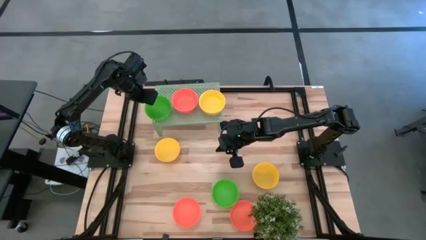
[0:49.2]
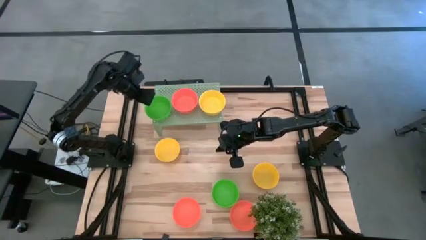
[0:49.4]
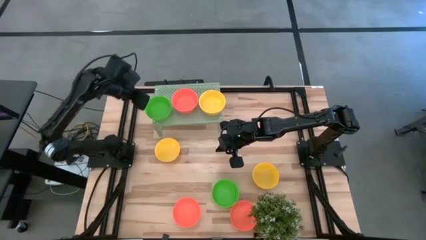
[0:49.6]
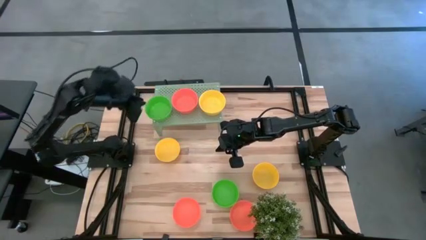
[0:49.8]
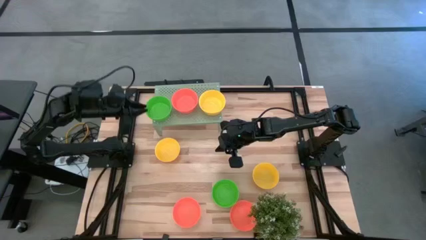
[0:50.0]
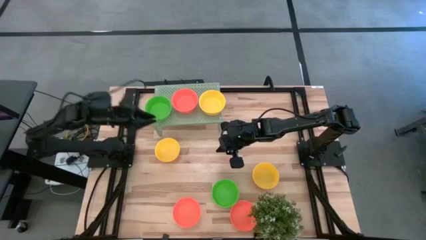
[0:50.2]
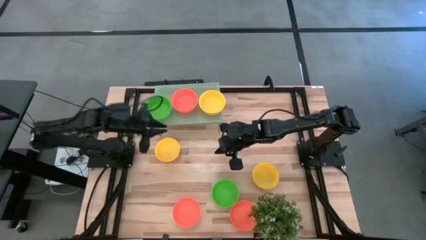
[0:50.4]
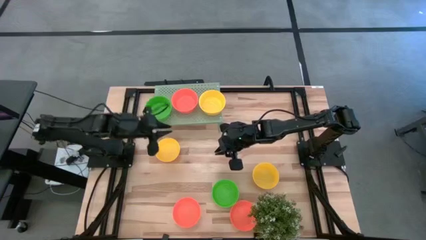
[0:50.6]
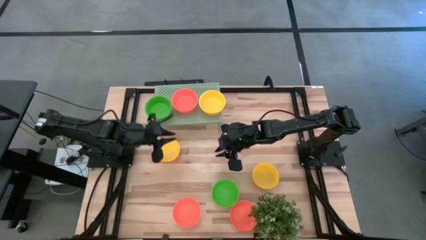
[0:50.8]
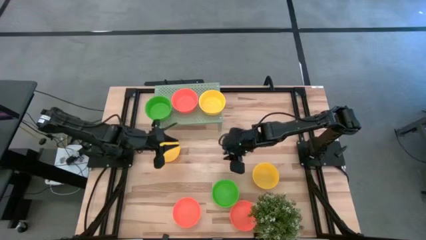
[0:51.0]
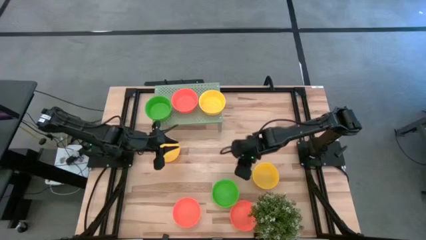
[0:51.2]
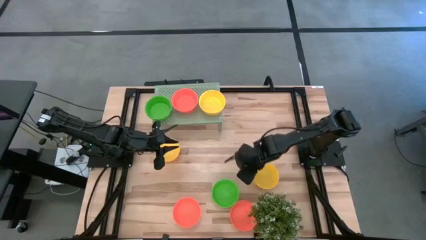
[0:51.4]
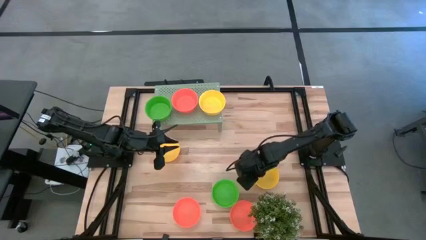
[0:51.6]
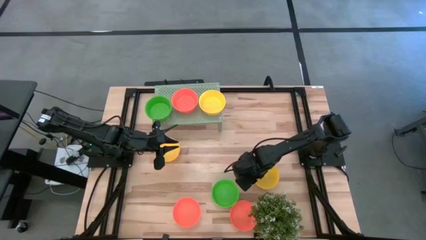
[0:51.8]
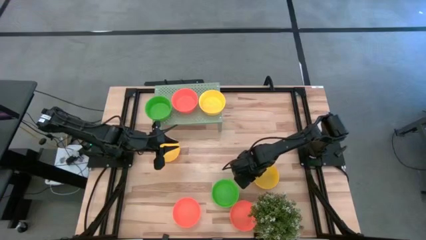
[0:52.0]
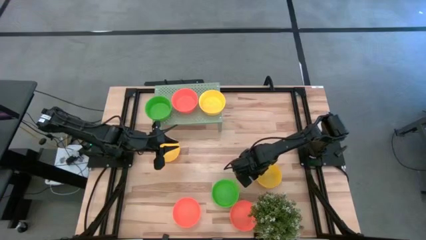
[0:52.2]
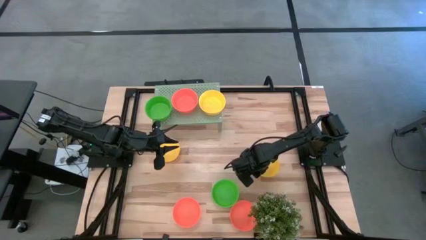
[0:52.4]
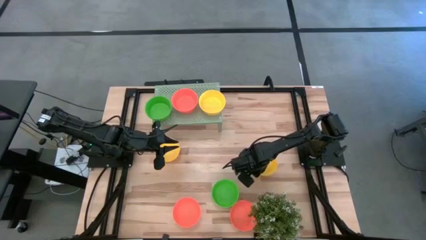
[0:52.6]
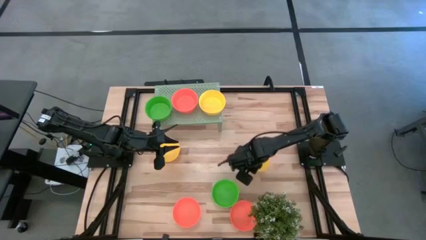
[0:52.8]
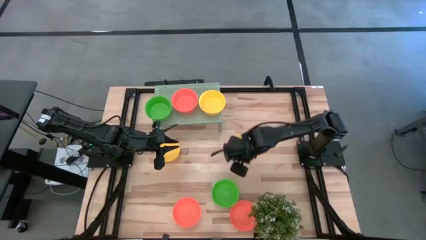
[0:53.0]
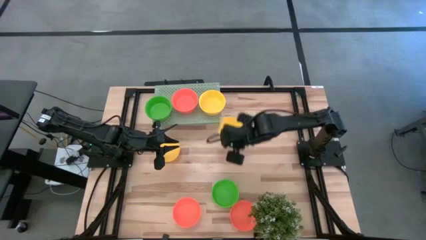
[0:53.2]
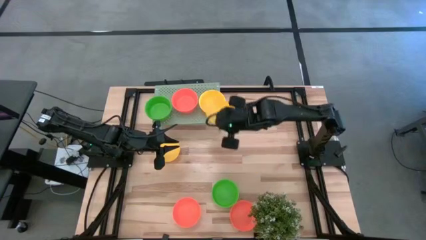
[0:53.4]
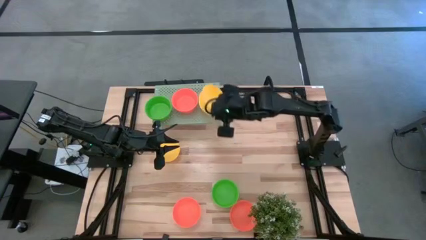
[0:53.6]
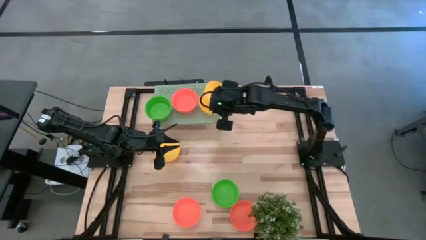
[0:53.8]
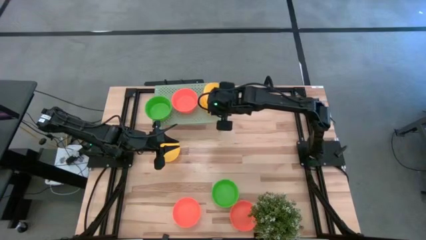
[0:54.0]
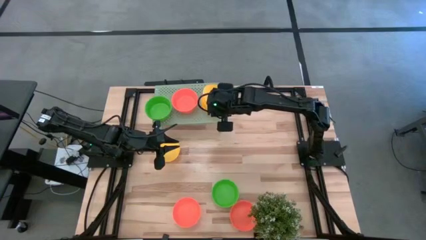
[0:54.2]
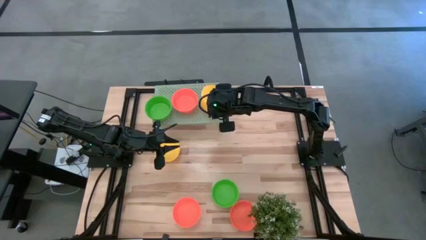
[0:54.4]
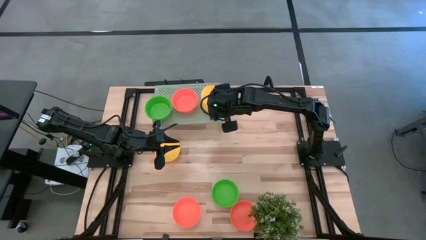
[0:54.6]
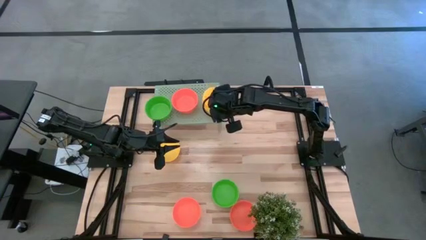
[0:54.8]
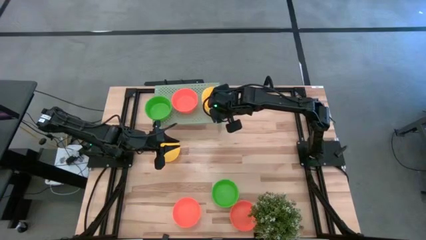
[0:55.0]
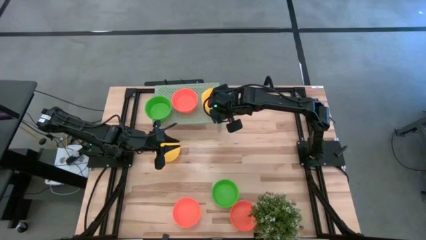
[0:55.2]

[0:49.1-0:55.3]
Task: Pick & Place Mini bowls
Stack the yellow bowl on the yellow bowl on the shelf

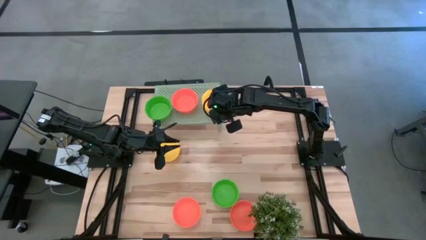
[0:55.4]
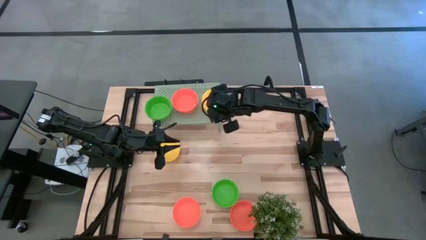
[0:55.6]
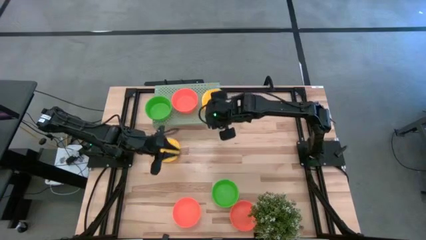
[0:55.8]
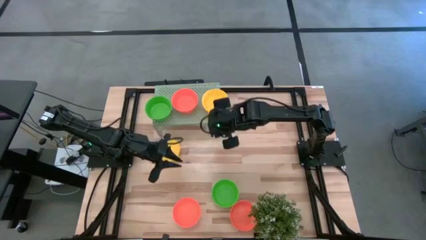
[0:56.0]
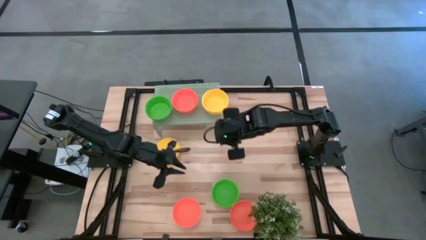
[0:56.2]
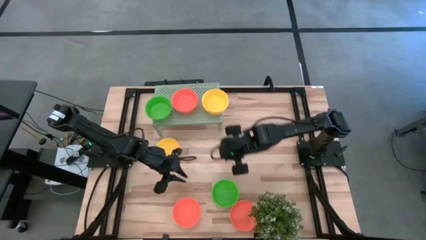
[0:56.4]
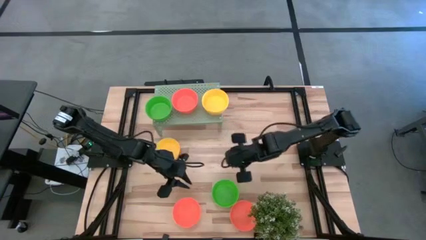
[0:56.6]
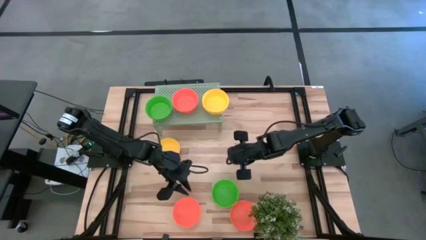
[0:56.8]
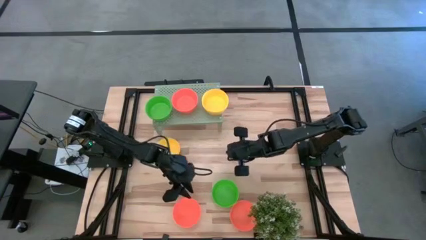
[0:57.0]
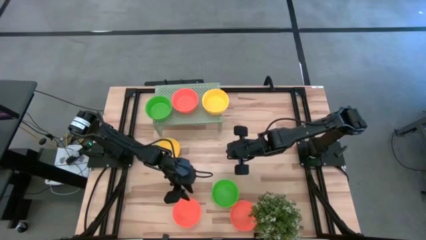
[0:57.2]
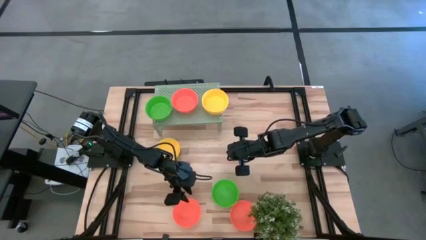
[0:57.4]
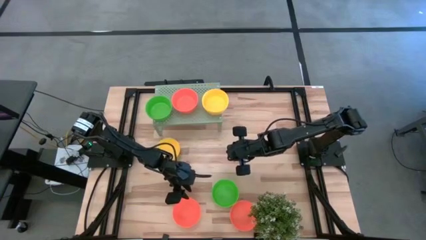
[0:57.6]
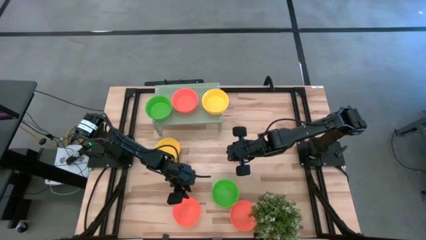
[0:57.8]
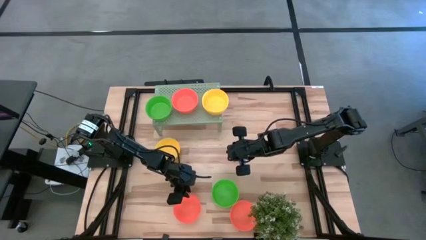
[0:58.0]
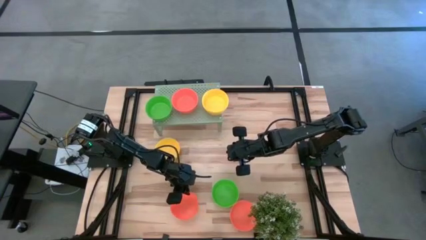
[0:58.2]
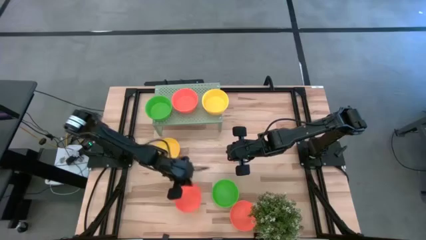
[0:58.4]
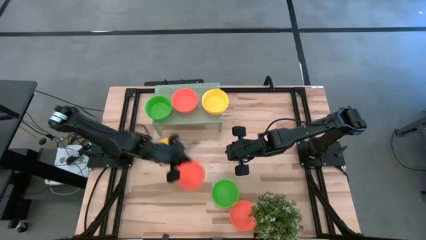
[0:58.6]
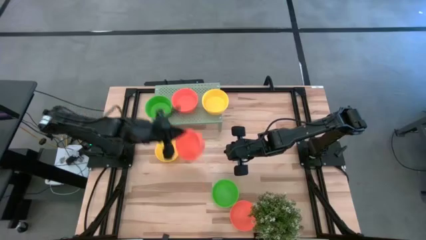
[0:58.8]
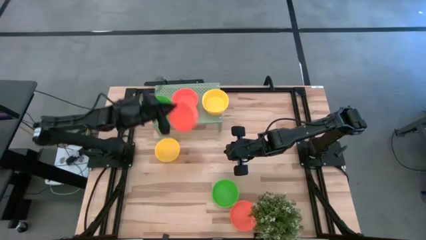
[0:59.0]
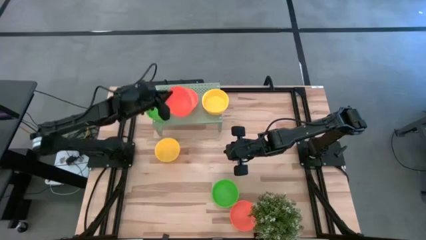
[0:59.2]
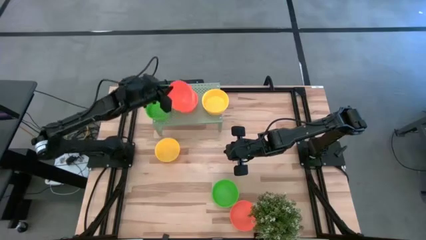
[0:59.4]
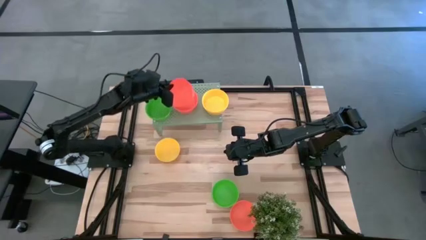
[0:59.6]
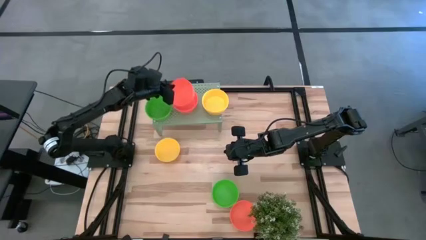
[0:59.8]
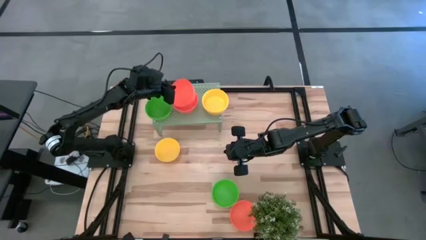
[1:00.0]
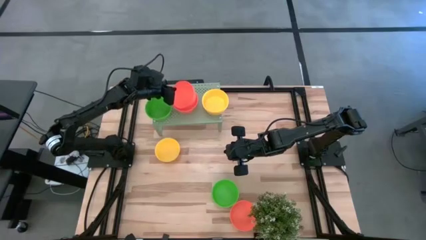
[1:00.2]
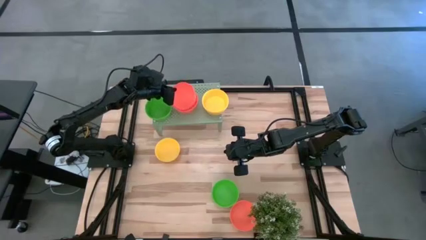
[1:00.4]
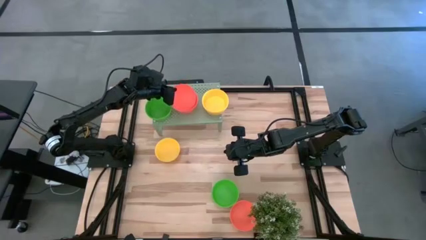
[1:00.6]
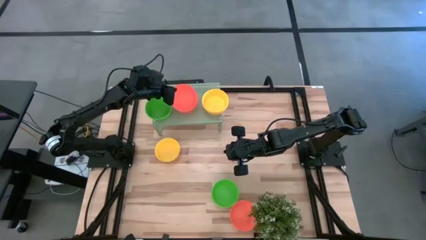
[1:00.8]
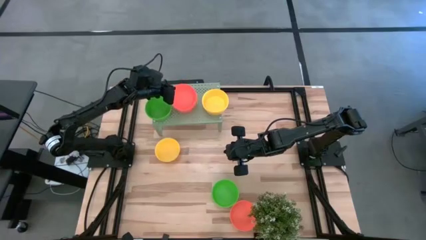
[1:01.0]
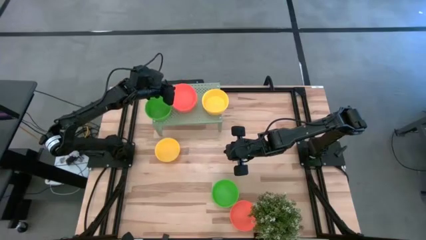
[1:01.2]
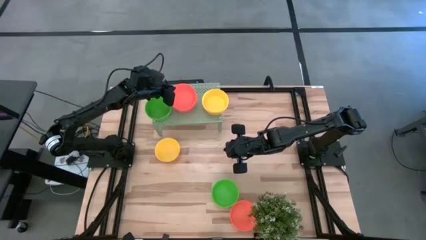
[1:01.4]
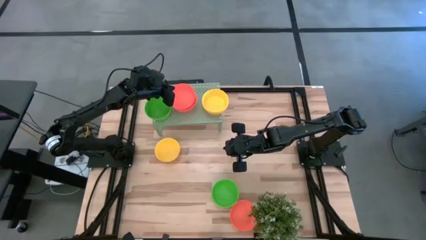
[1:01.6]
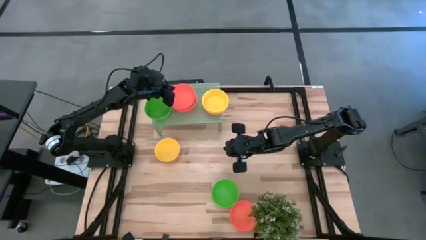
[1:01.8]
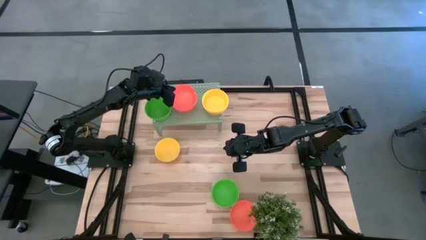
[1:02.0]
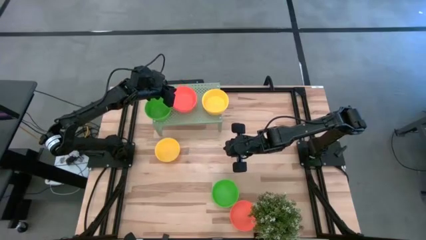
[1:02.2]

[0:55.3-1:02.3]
Stack the orange bowl on the orange bowl on the shelf

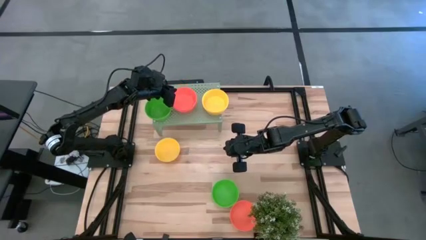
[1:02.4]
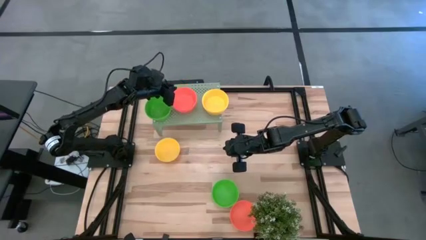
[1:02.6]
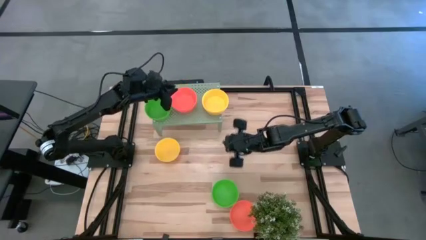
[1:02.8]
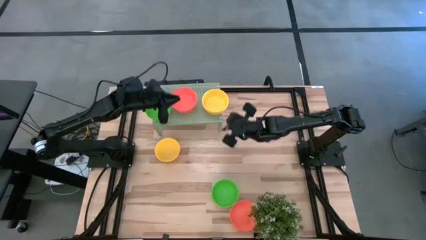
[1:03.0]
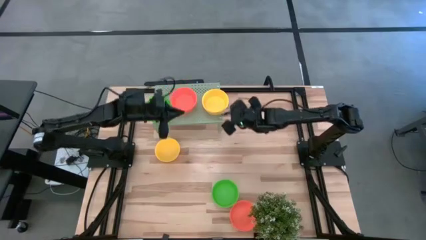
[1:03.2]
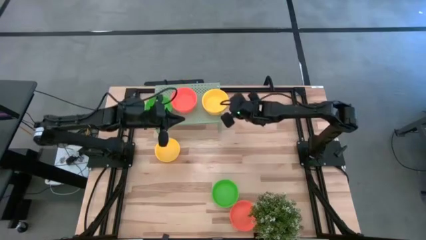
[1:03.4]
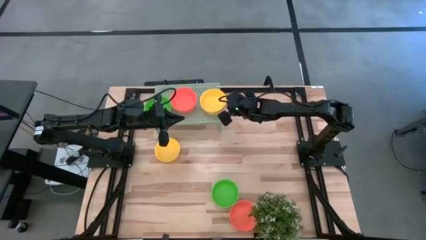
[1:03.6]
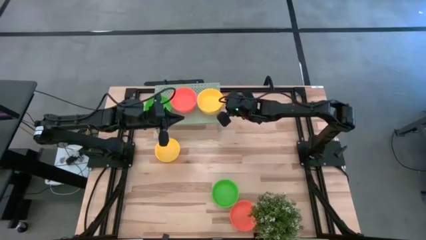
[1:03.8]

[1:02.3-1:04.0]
Adjust the yellow stacked bowl on the shelf

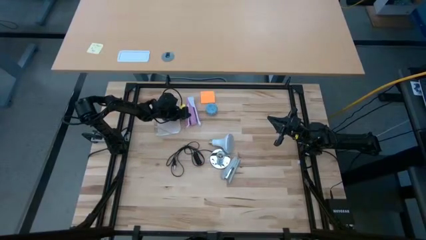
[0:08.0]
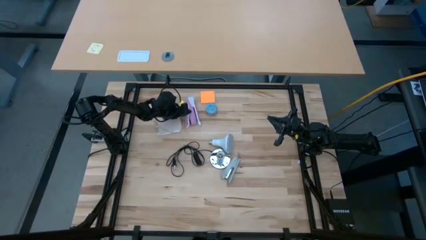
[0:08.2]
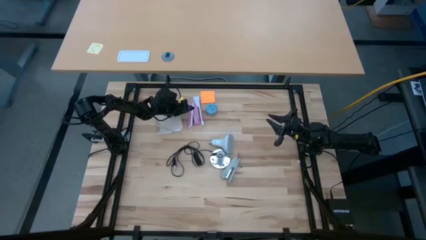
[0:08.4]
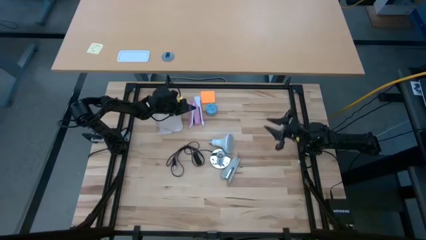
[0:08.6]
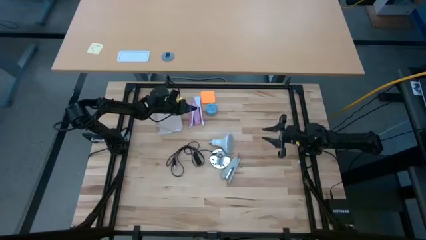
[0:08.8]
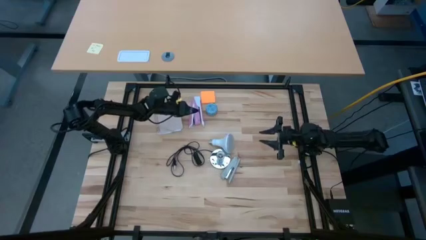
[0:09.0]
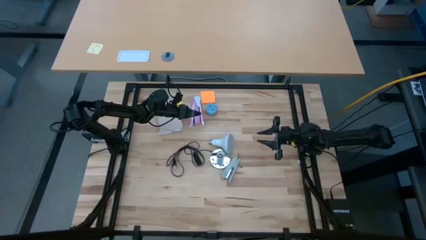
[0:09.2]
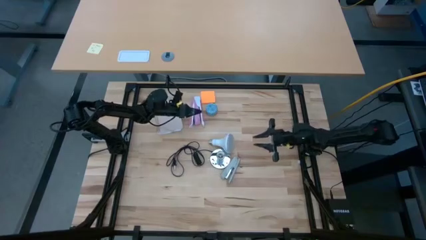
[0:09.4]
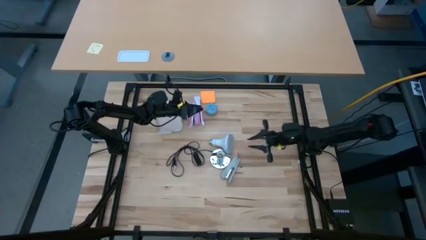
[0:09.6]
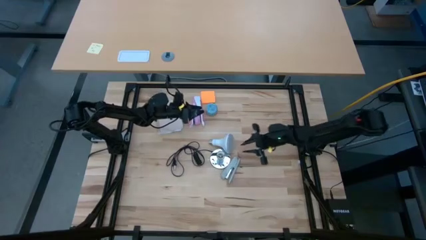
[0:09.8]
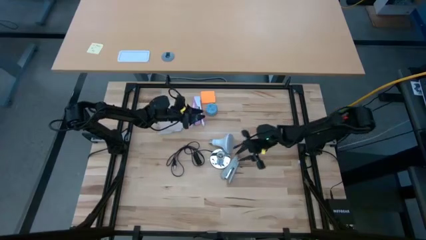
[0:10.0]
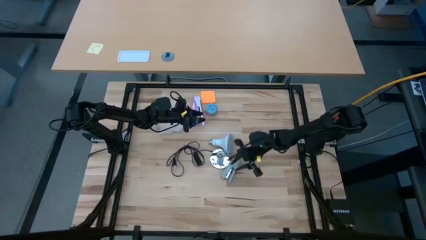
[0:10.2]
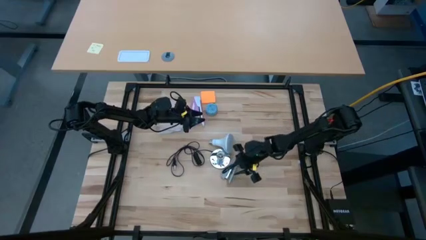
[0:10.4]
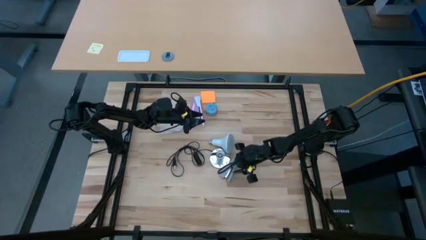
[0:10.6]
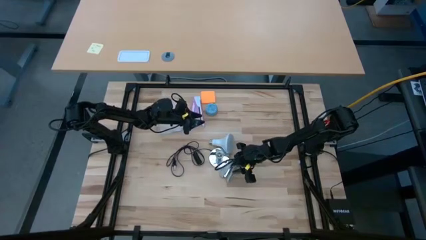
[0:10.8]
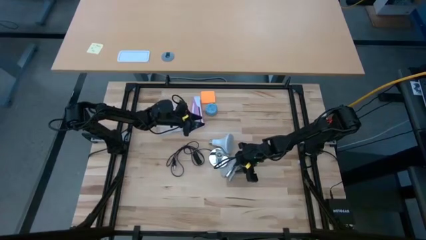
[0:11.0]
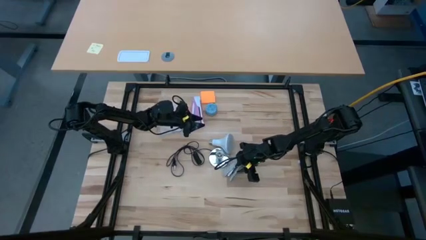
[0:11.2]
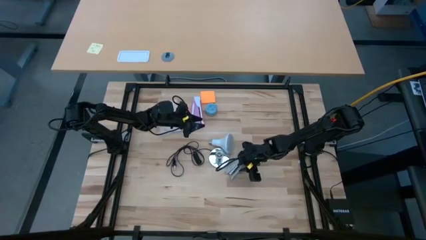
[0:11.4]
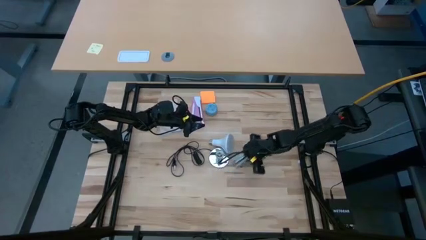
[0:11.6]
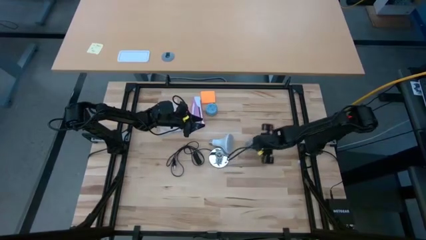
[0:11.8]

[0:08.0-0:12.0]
Task: Screw lightbulb
Move the gray stapler to the top right
